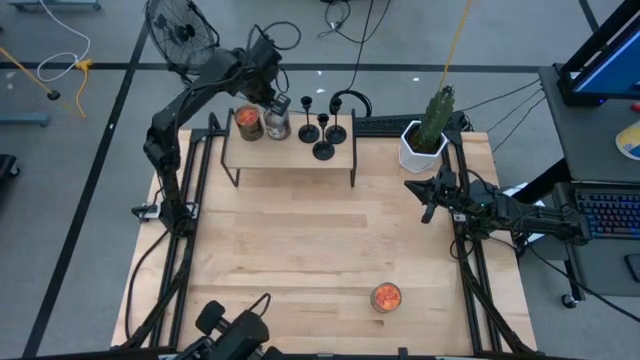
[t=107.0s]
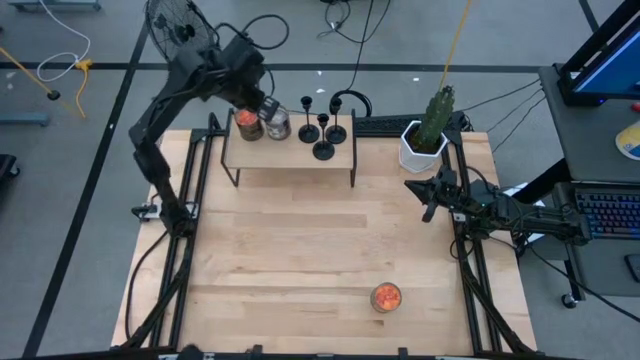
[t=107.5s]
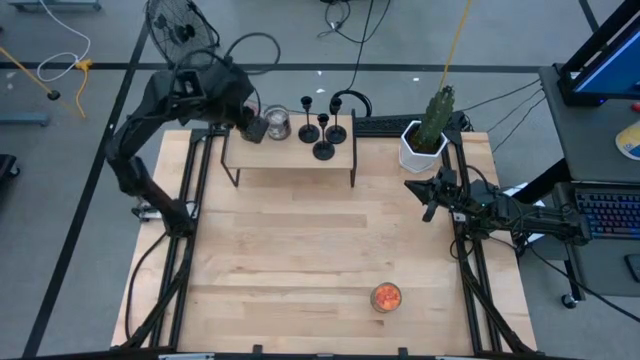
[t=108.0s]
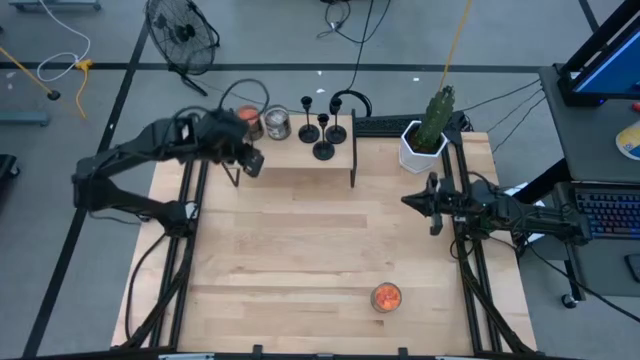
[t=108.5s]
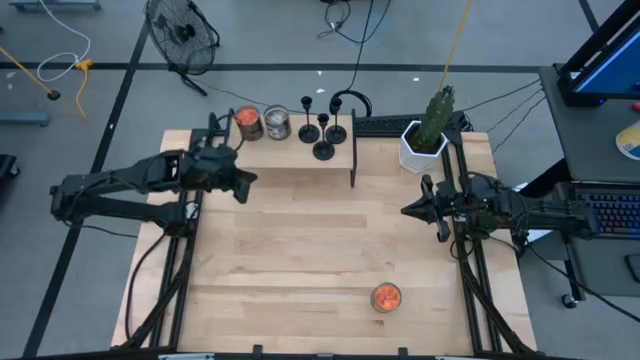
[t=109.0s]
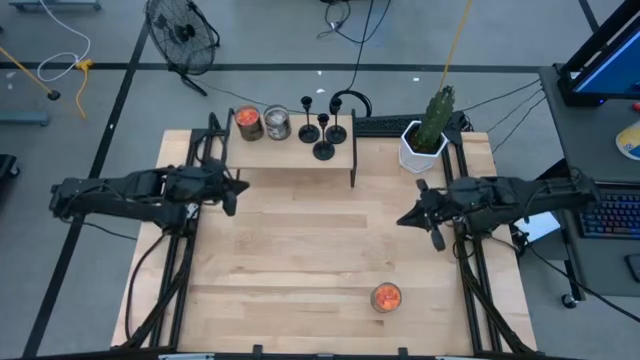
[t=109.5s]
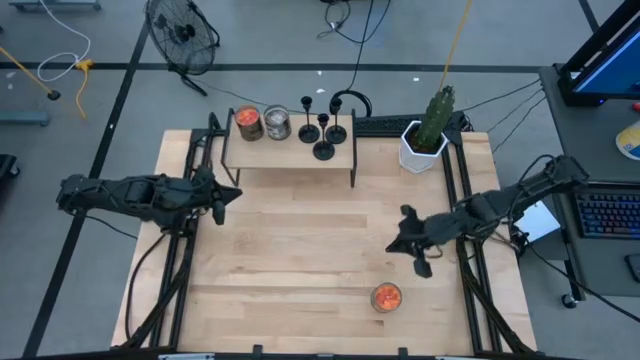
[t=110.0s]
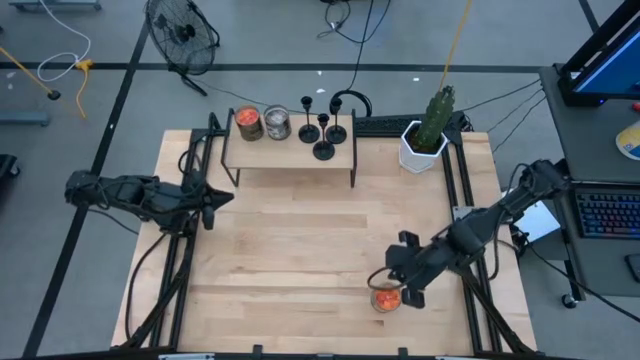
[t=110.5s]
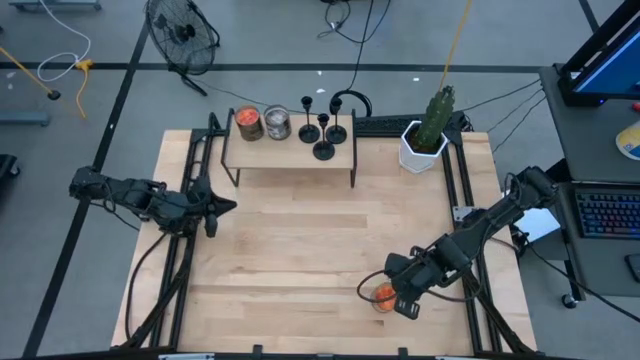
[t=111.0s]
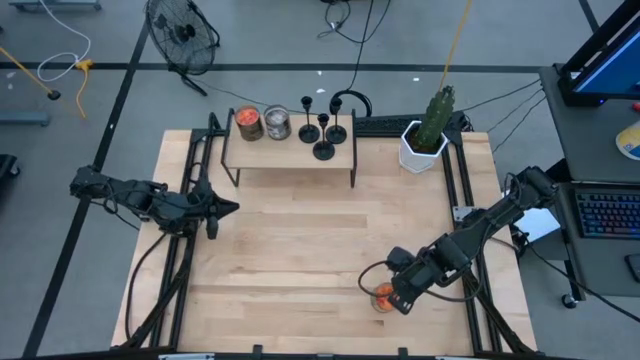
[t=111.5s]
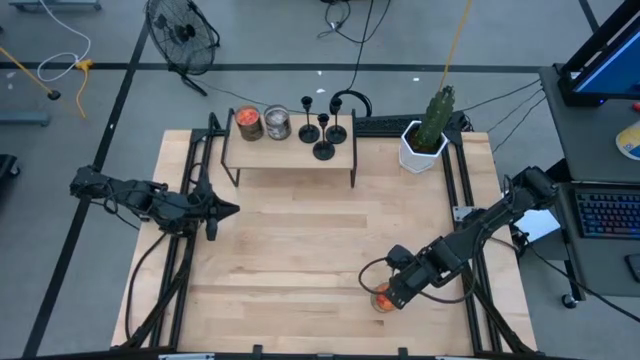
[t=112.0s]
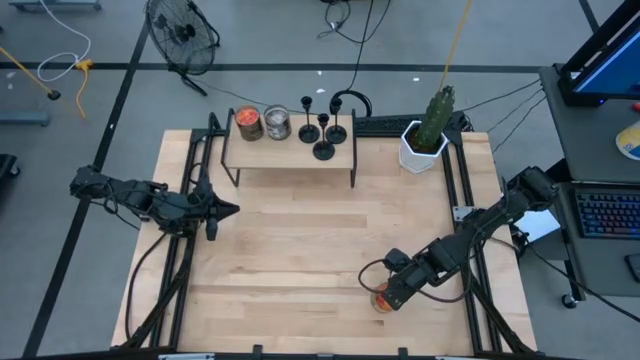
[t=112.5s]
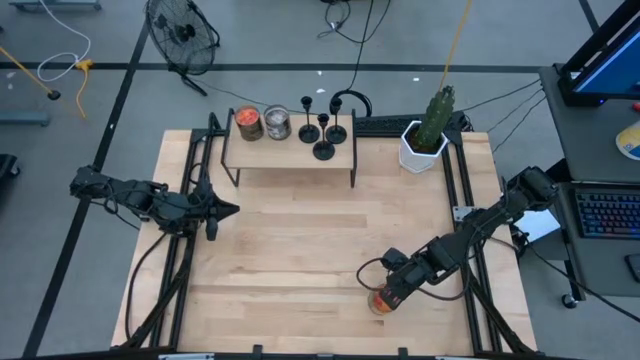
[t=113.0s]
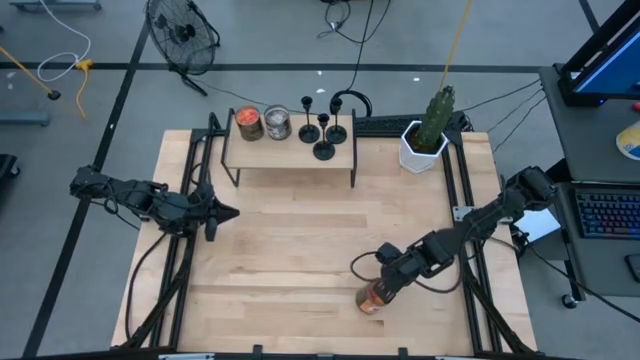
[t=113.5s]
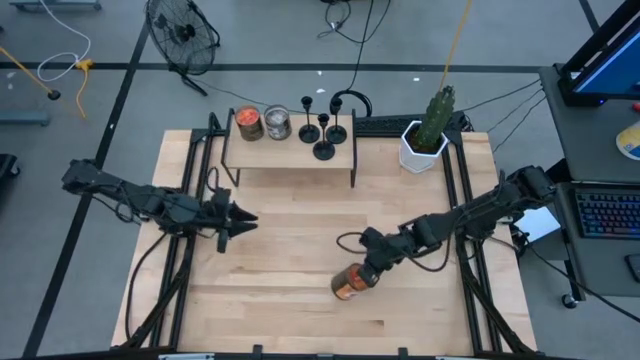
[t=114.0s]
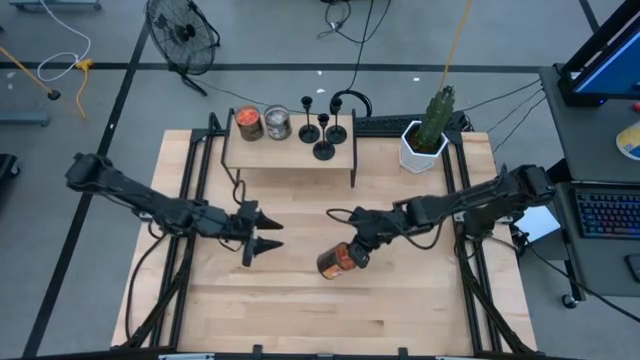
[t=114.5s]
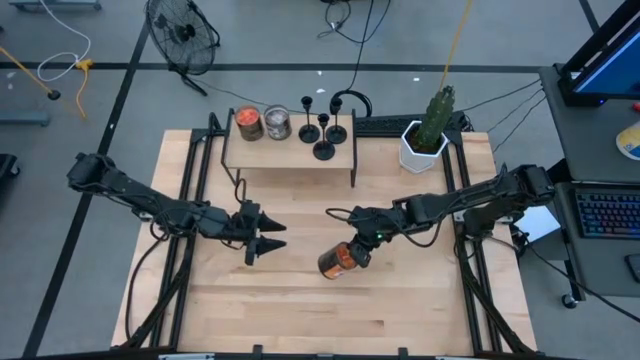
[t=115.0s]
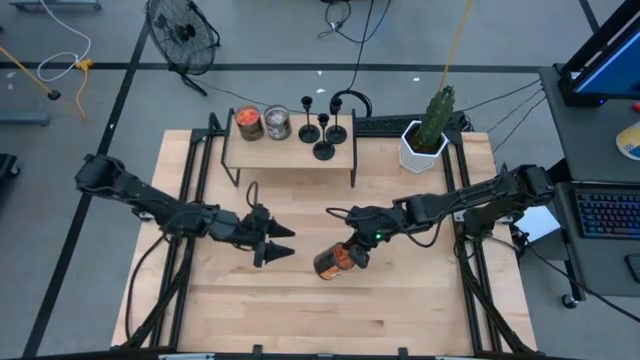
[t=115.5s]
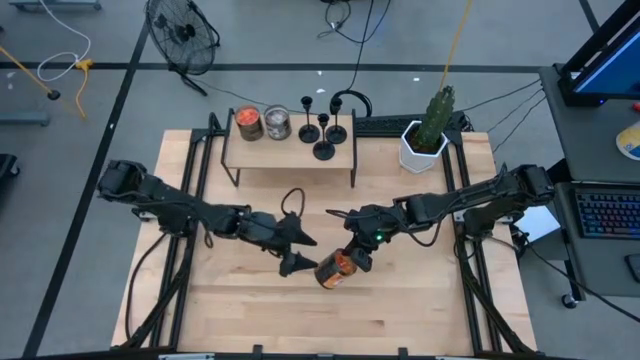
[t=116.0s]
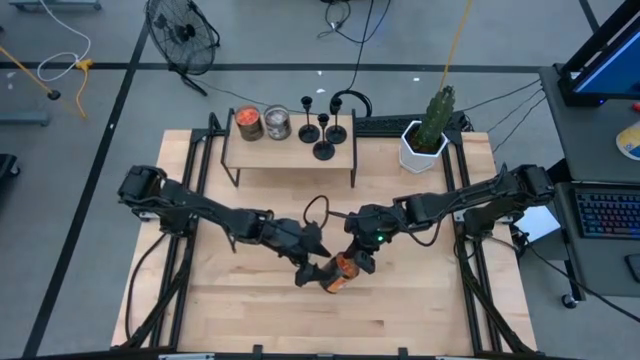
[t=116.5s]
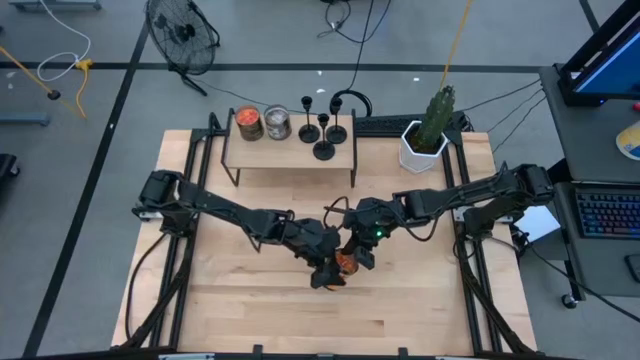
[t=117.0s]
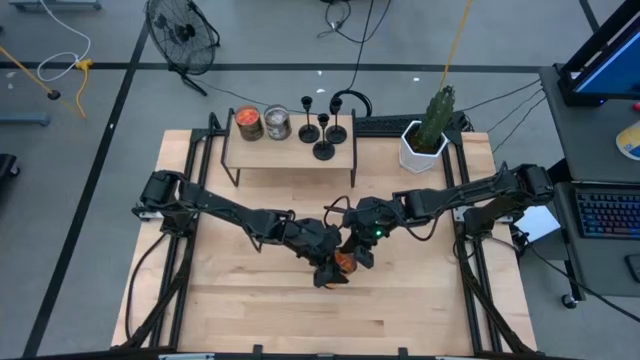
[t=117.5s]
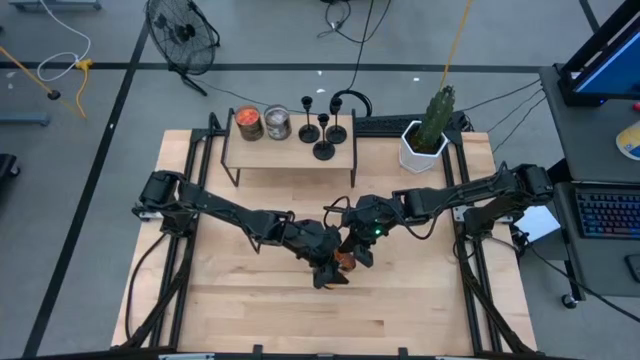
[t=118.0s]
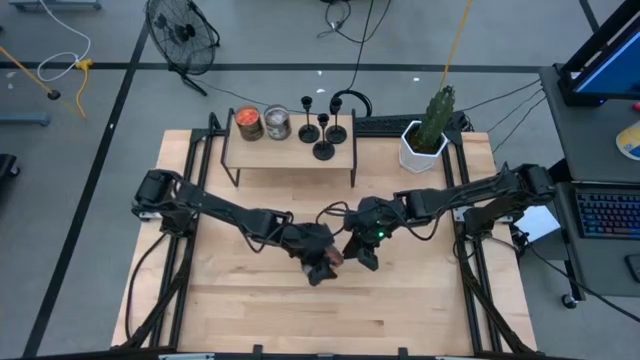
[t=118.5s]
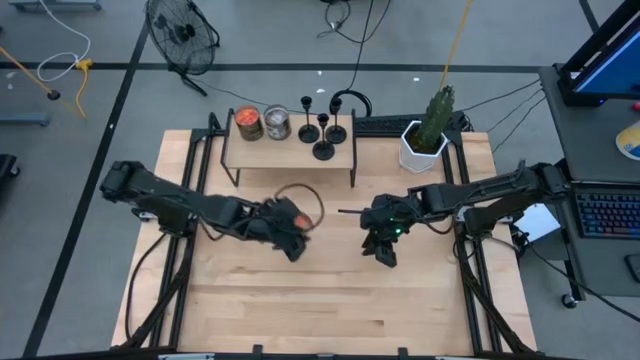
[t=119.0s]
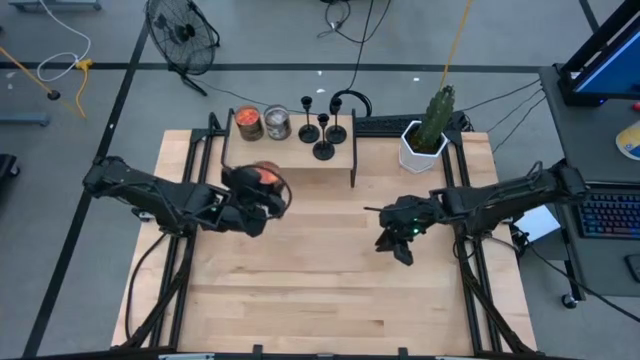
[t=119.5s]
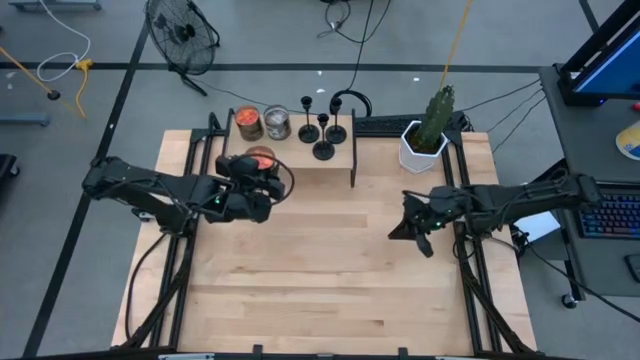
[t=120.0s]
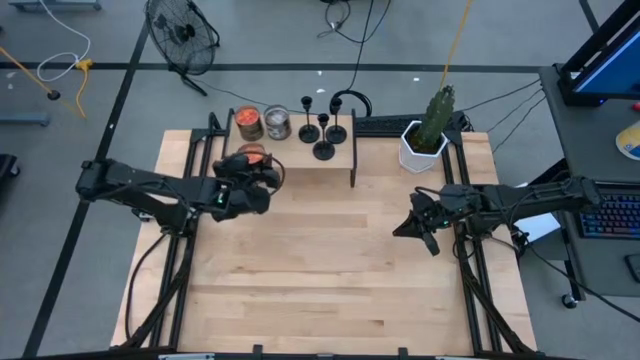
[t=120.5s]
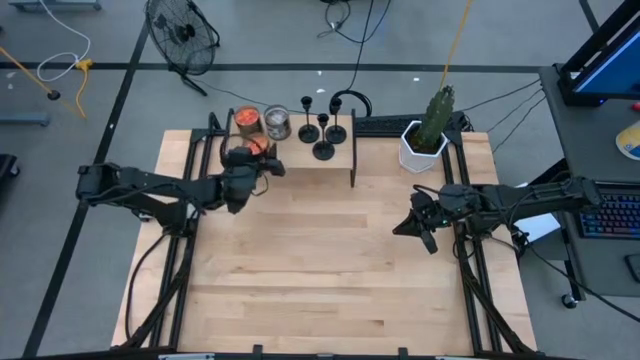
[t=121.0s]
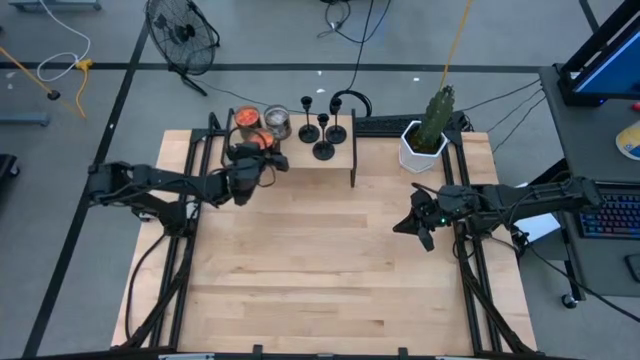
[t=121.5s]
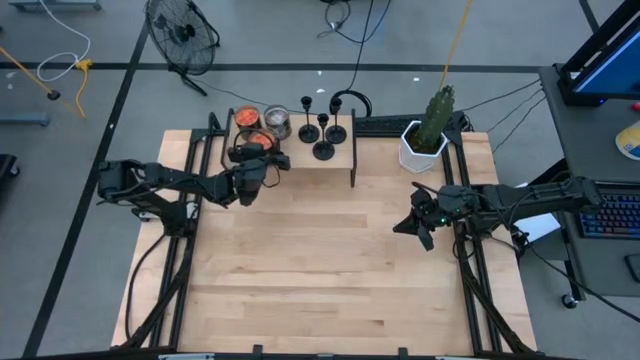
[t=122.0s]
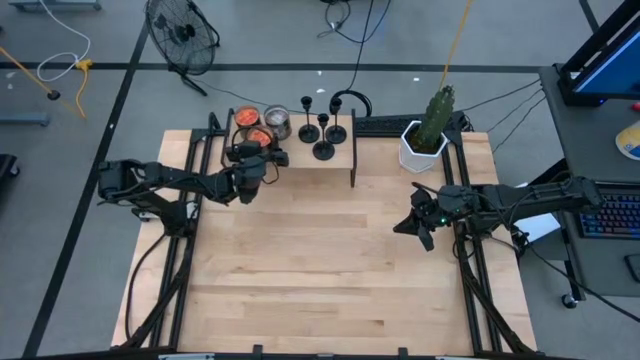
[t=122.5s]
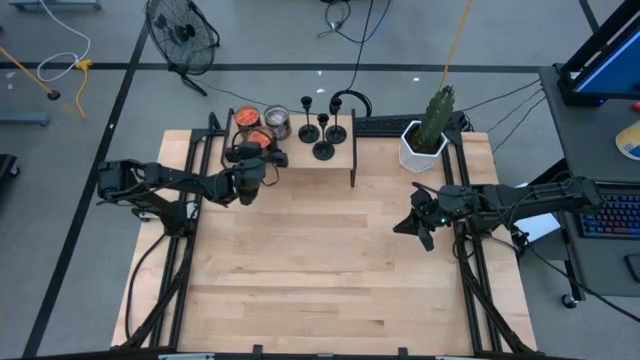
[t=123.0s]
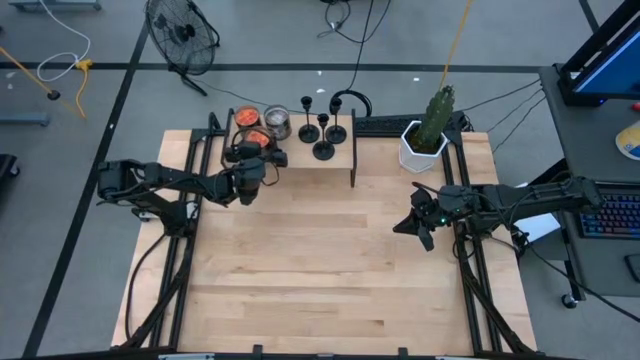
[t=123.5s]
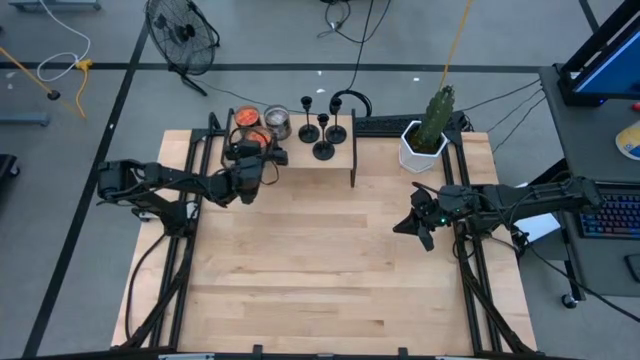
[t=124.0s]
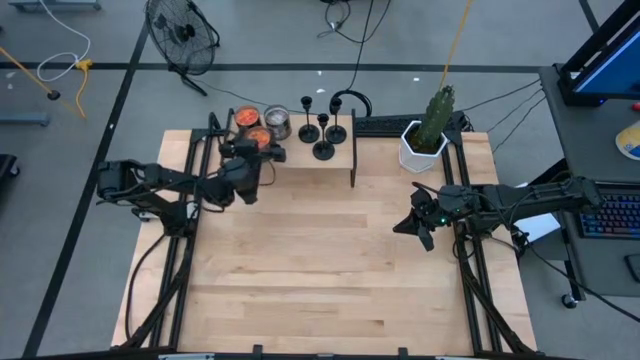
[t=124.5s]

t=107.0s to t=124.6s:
Task: Pick & Place candle stick holders
Put the orange scented candle on the shelf

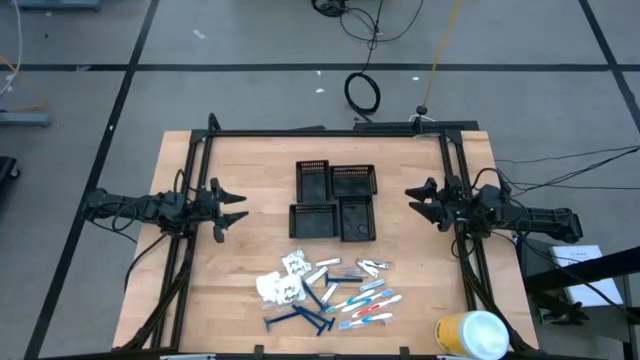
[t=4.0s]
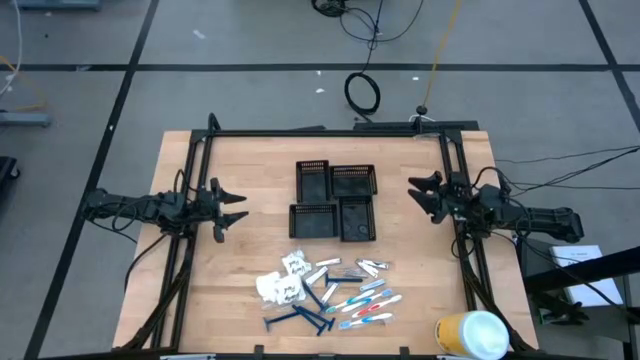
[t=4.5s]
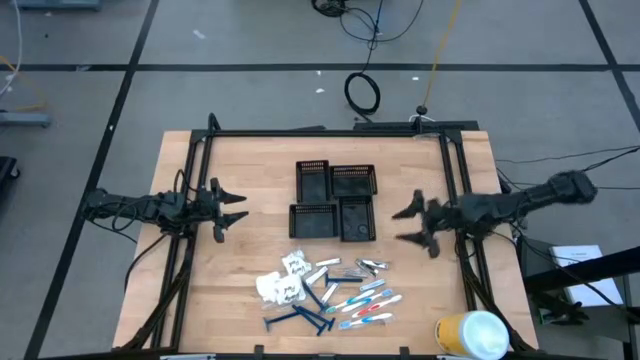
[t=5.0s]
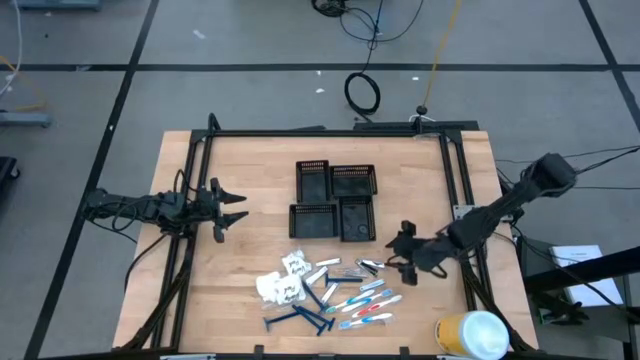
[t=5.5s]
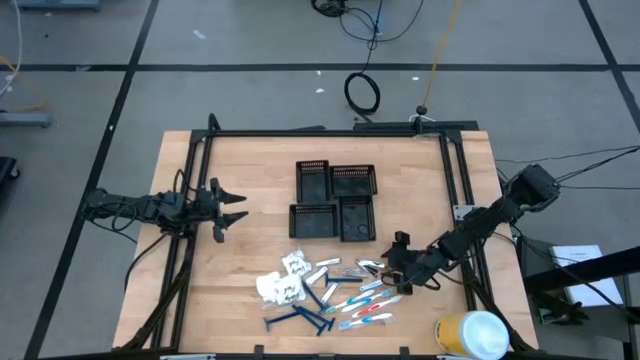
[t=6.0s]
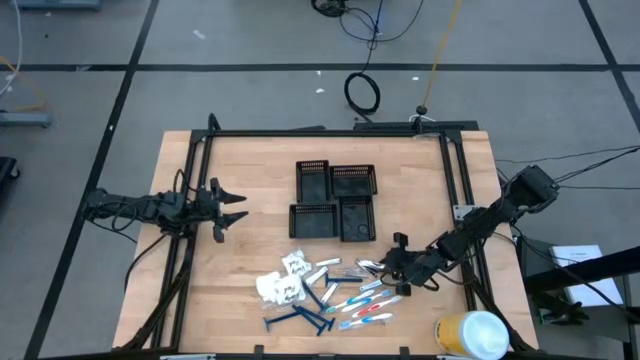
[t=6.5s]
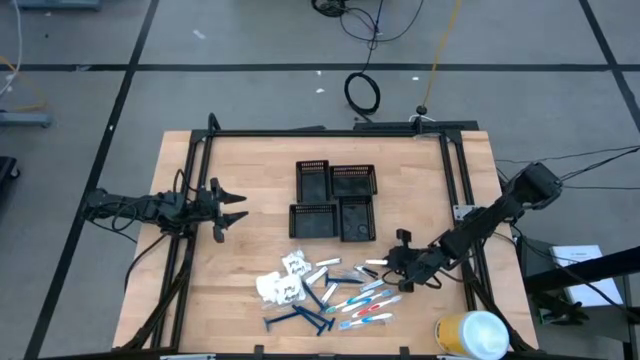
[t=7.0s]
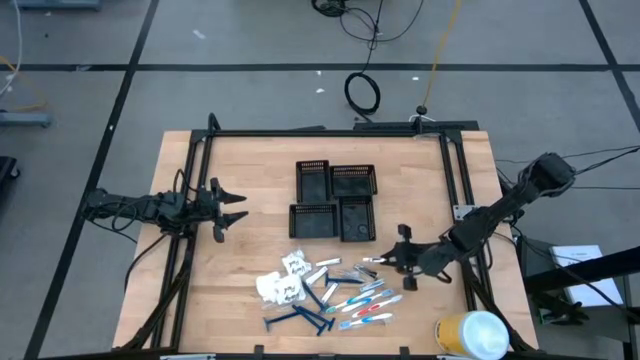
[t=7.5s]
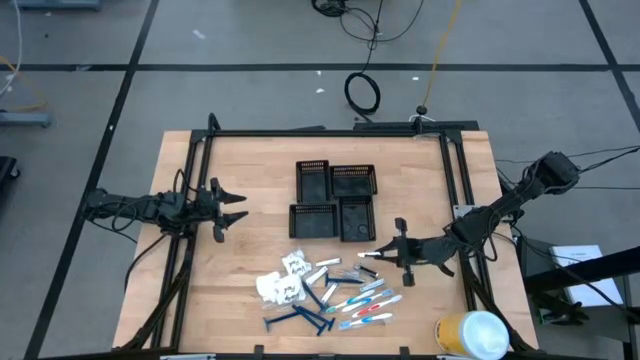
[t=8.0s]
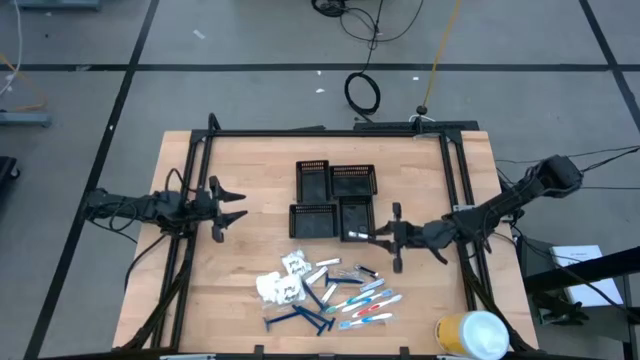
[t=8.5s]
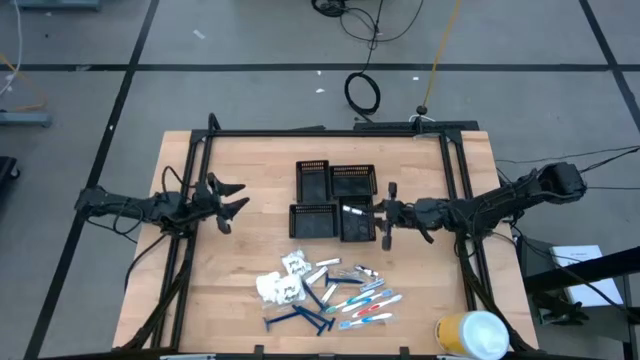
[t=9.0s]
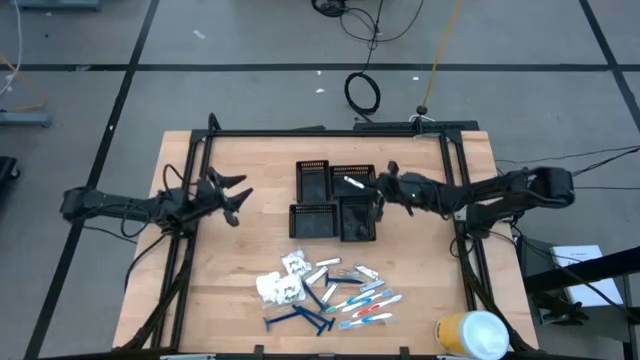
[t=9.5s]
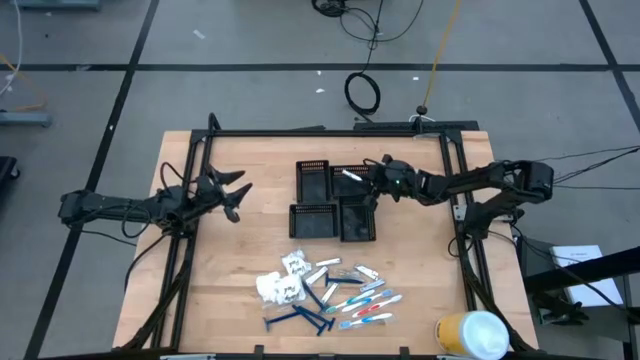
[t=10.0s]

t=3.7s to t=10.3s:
Task: Pick & Place Travel size toiletries
Put the silver nail cutter into the top right black bin
